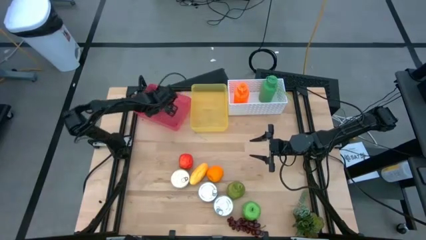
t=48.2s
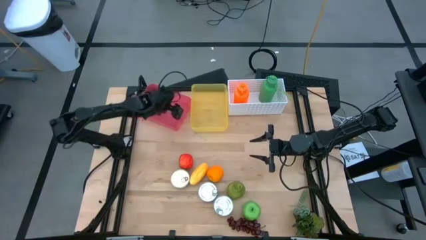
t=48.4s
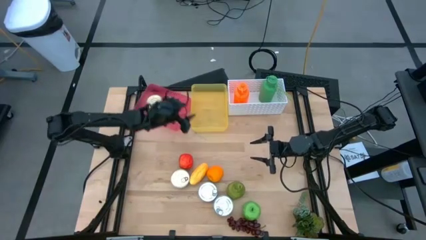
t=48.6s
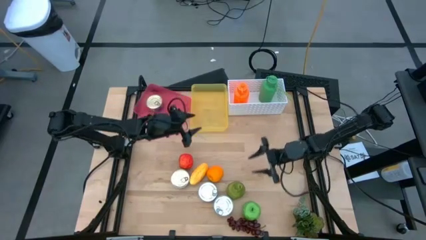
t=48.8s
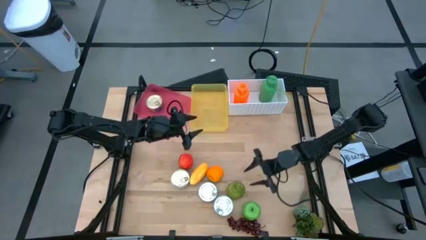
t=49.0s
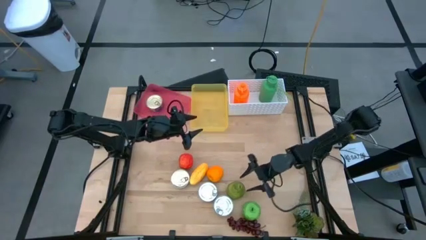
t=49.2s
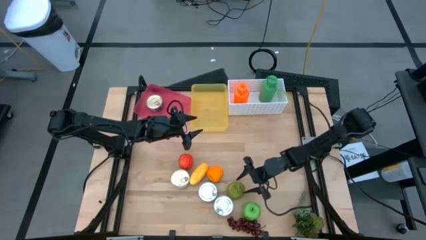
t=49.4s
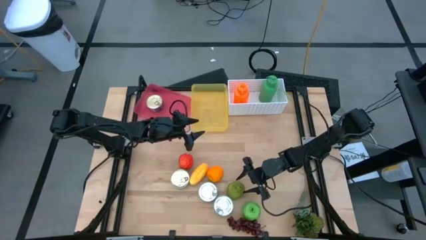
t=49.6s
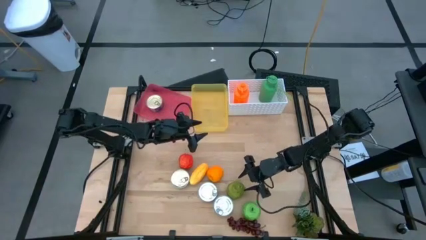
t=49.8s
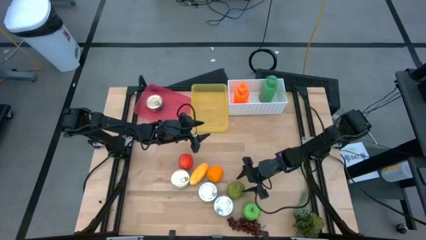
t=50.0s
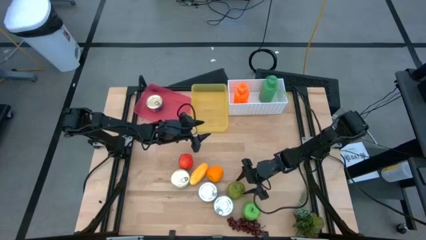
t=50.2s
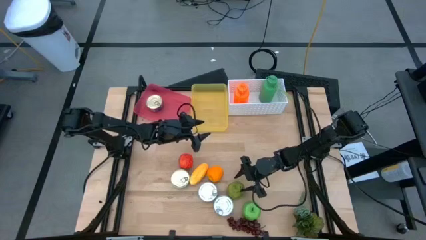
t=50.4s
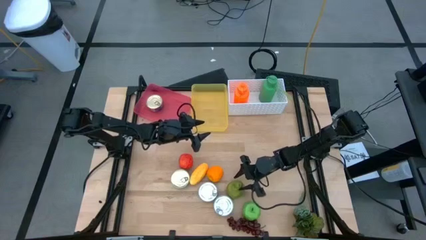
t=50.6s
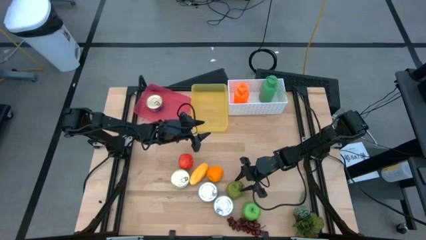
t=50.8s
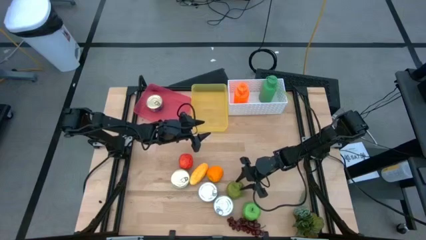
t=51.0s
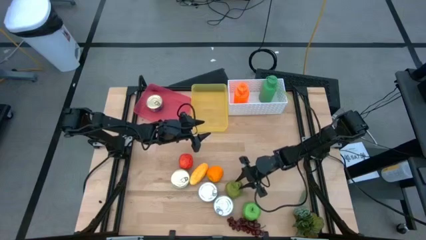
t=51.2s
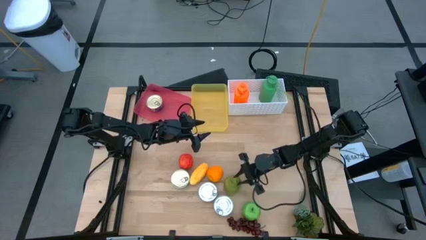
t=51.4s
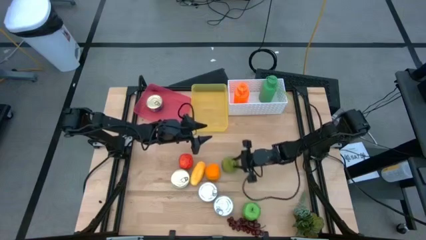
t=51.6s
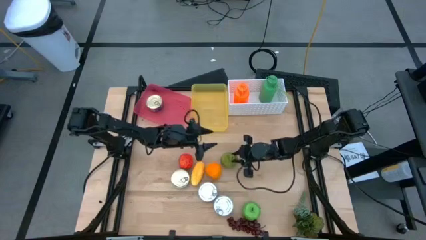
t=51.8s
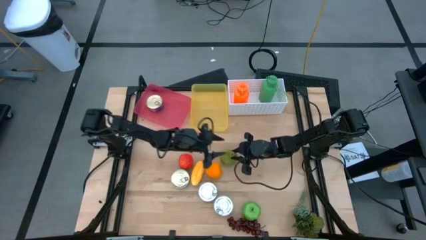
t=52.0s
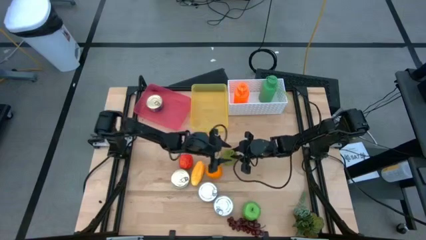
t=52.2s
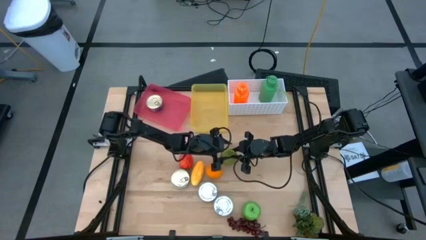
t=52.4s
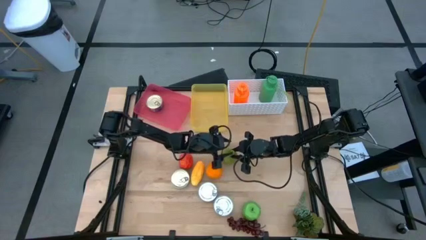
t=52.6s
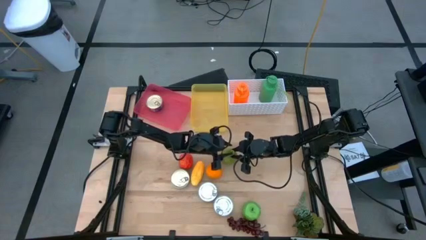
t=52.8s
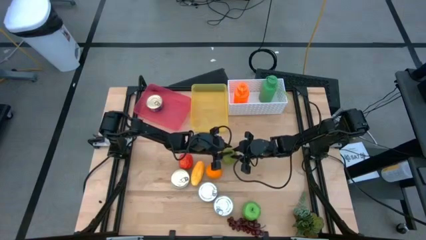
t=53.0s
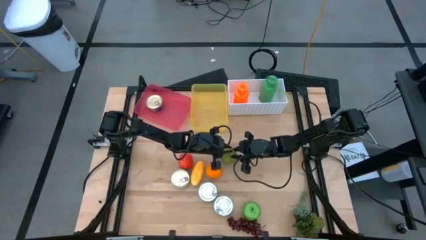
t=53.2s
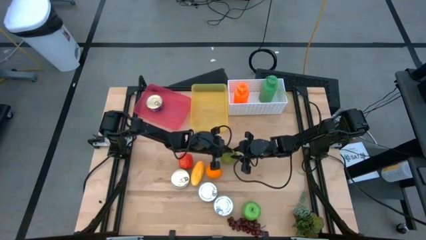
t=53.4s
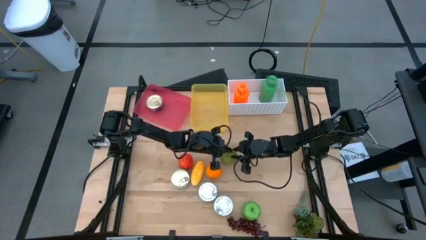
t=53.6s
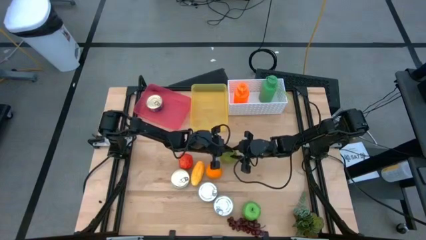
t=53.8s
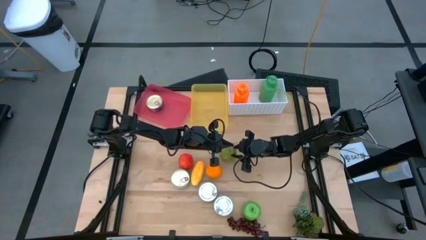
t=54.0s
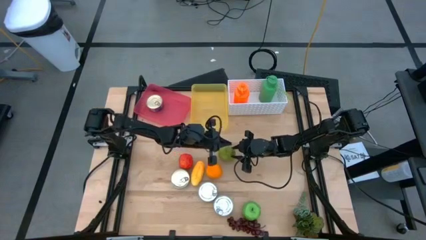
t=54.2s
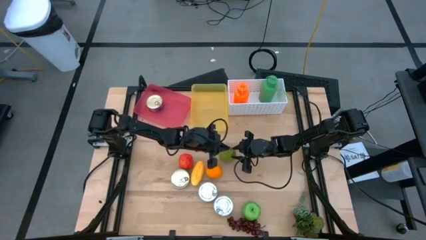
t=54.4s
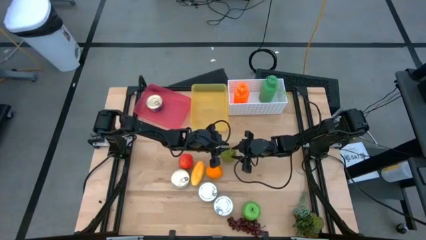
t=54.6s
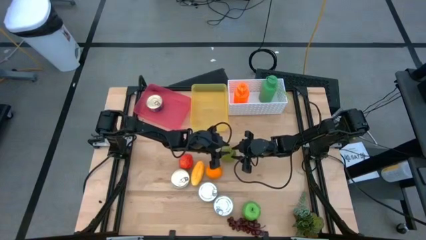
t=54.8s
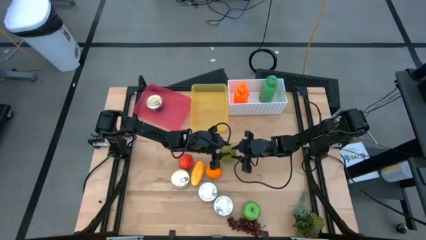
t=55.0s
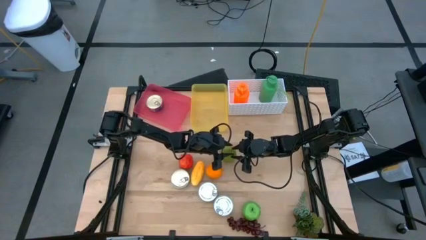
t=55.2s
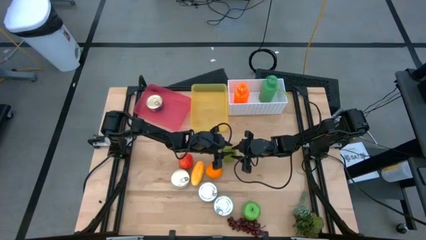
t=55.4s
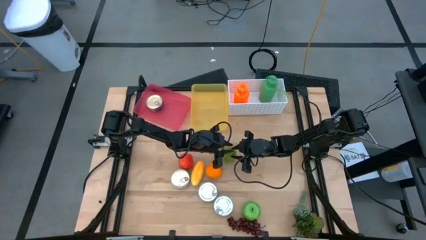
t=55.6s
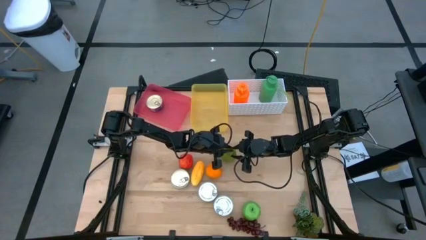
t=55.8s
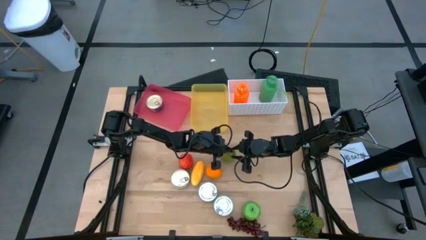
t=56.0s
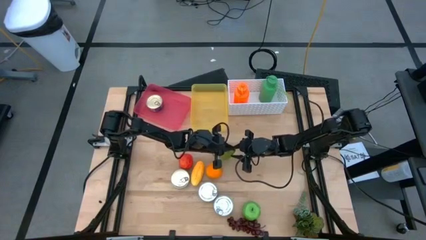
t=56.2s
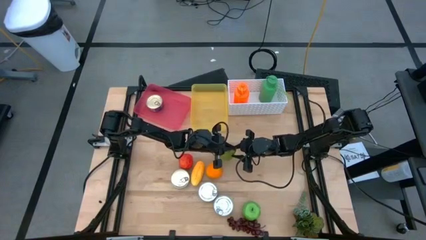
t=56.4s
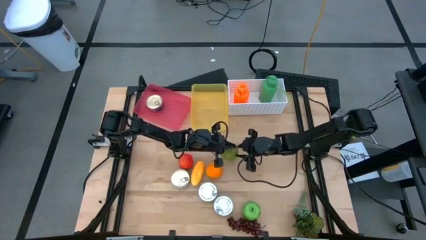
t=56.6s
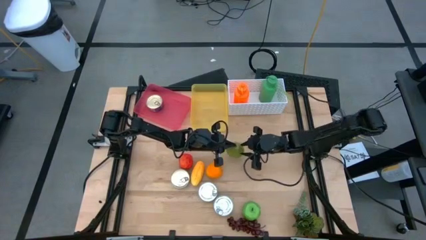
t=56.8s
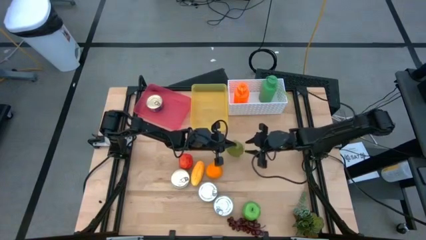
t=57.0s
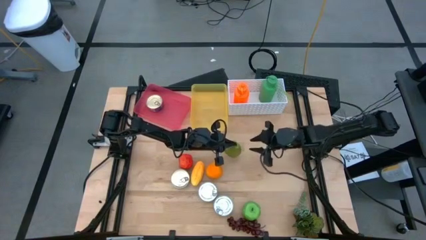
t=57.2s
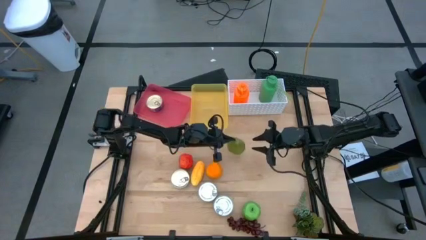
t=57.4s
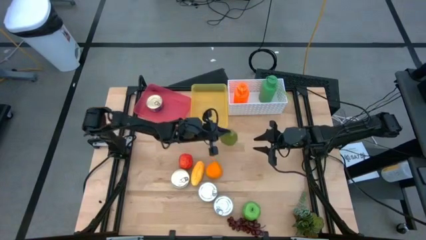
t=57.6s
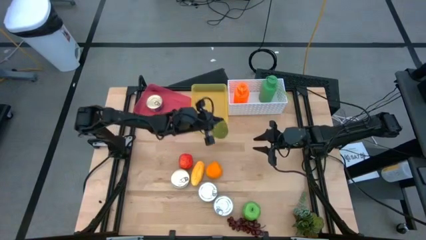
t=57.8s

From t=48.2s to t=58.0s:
Task: Pick & Place Food Item
Put the green pear into the yellow bin

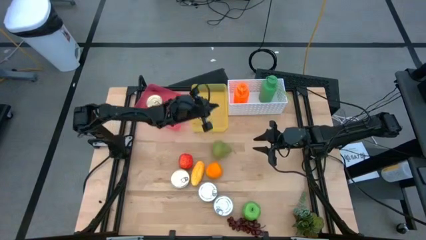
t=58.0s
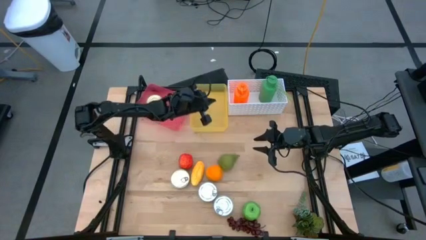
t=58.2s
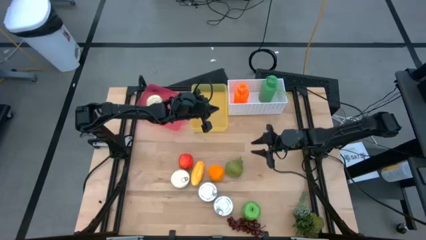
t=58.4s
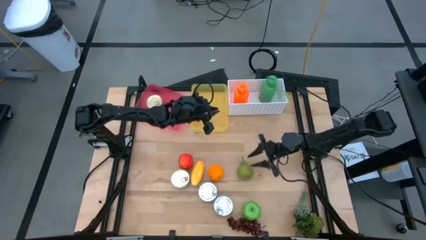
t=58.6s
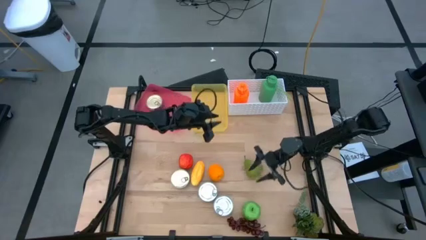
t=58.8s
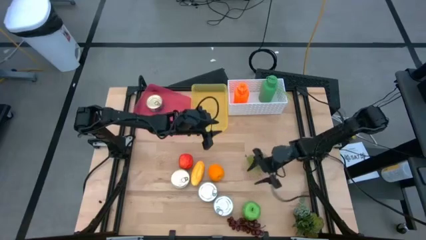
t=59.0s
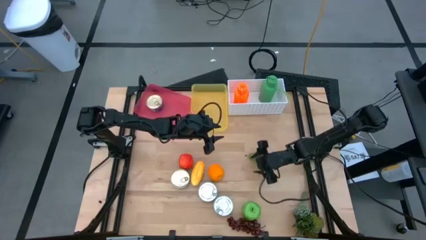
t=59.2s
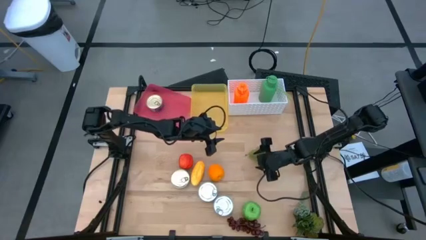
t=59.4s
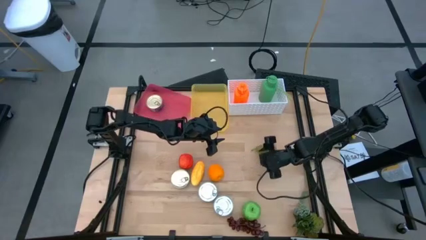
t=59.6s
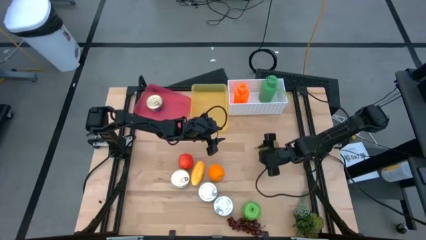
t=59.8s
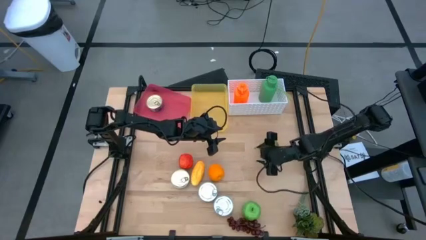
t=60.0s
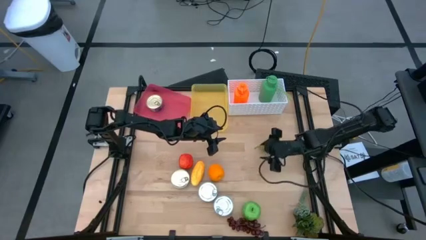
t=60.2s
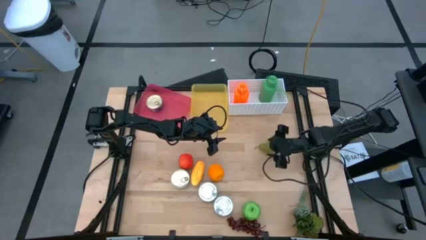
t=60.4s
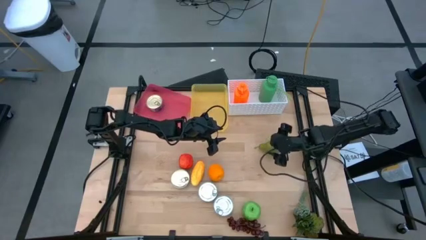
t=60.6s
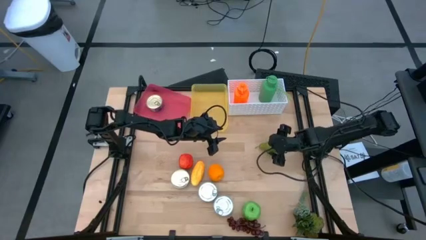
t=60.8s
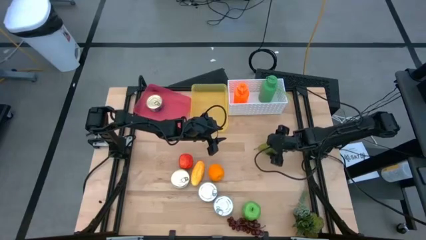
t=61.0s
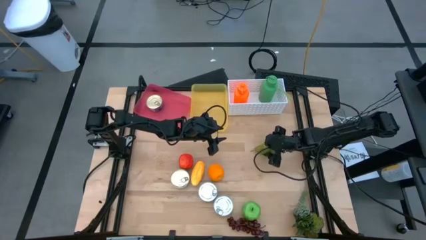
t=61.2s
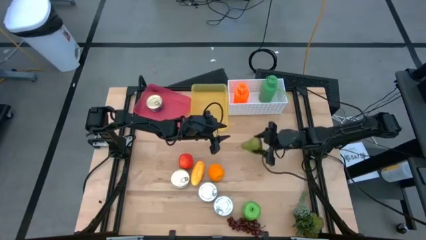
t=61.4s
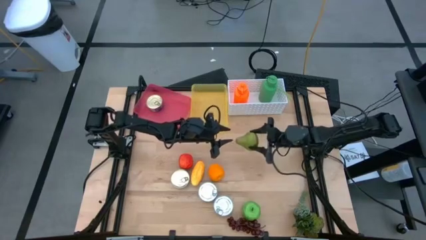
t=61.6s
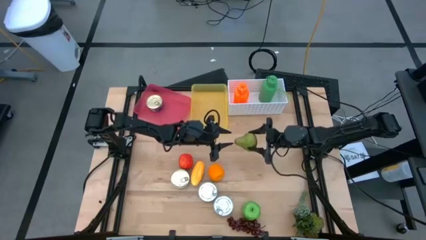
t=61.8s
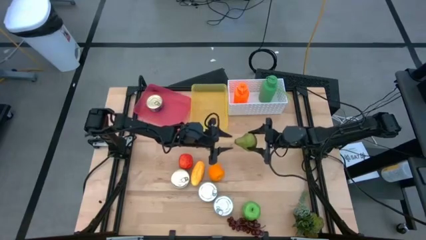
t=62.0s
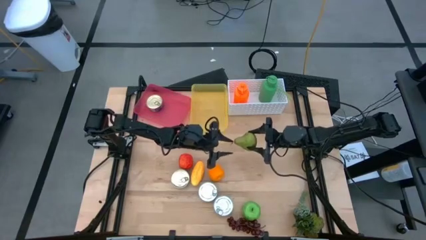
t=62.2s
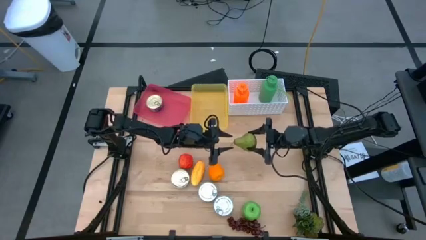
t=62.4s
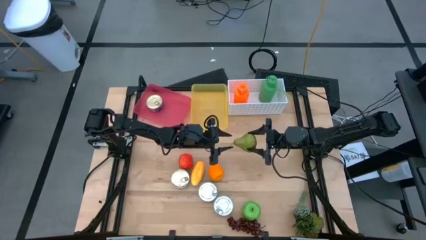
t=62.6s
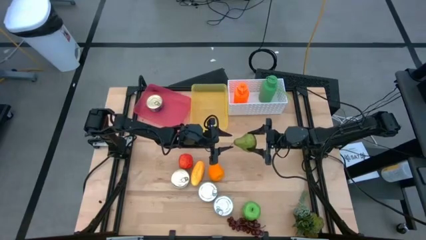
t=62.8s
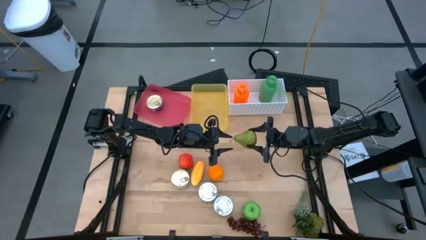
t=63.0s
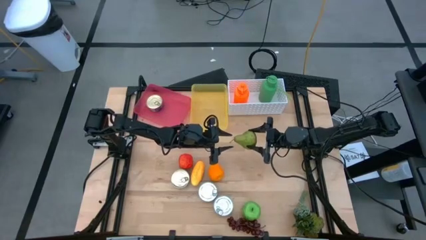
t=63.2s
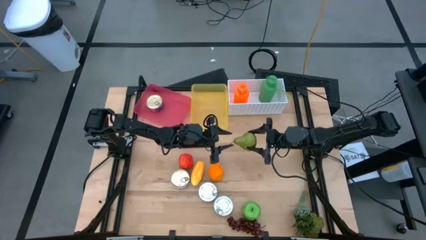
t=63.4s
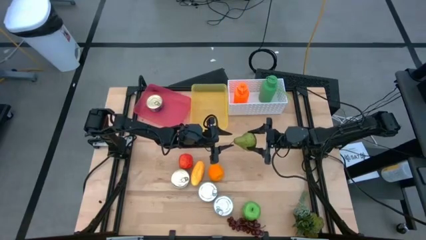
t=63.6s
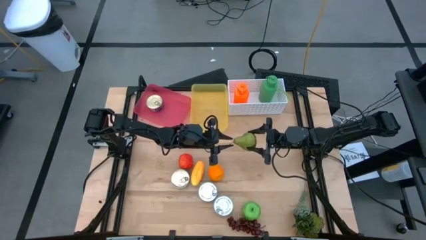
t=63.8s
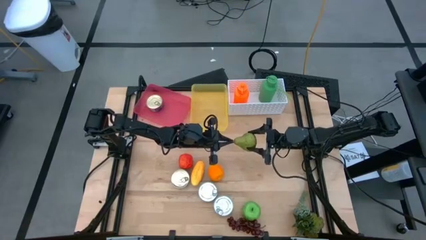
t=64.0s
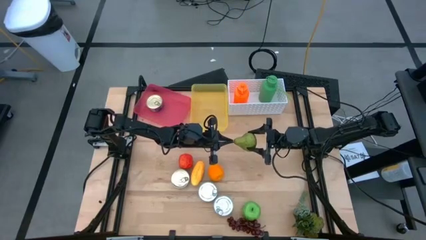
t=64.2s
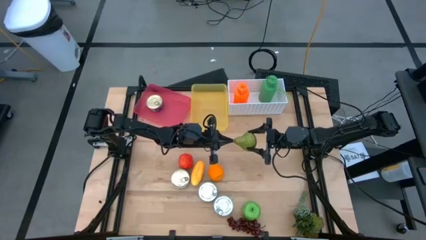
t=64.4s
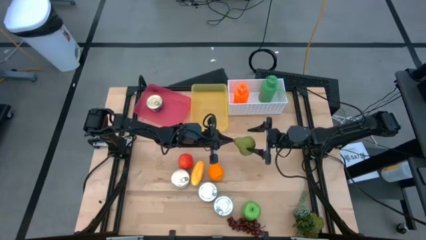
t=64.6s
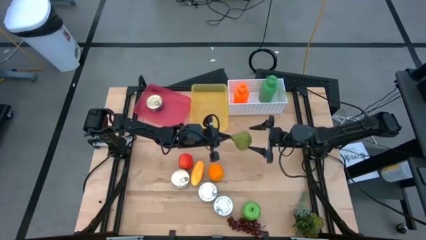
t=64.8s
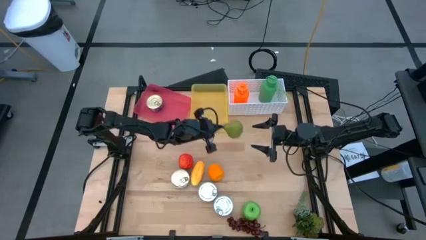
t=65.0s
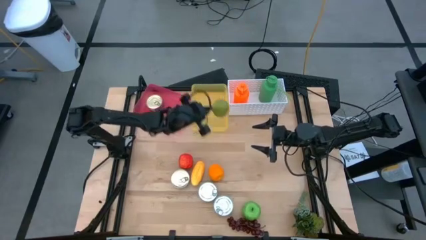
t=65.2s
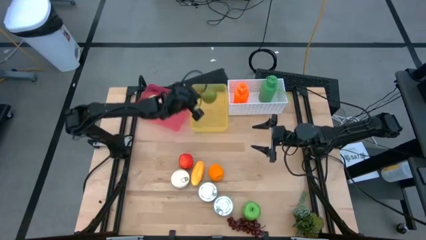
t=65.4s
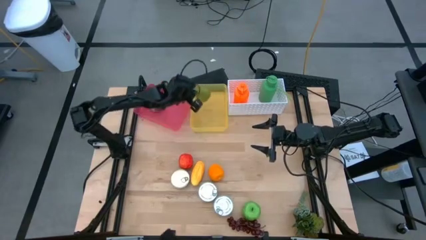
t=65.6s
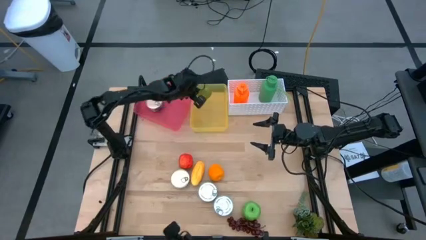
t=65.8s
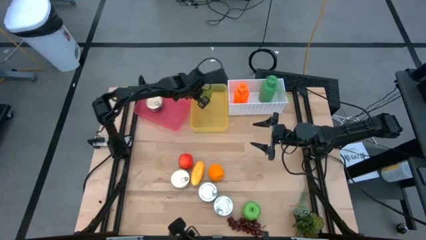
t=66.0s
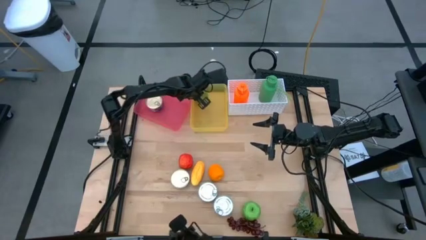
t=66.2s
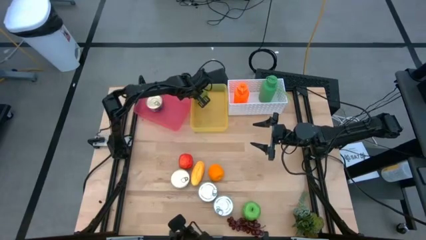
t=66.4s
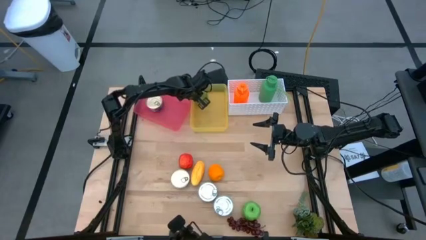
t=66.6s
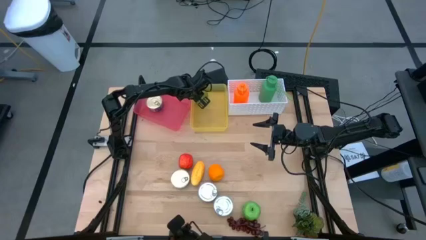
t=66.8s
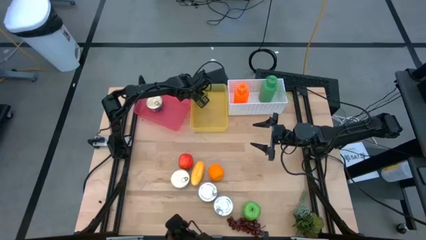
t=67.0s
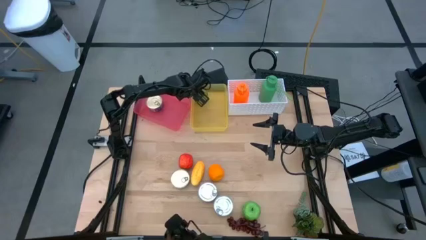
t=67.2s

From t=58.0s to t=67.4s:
Put the green pear into the yellow bin
